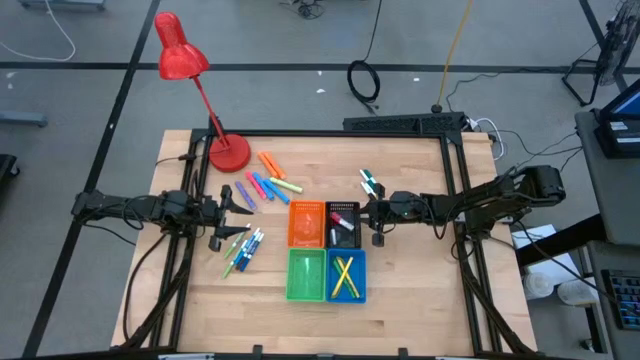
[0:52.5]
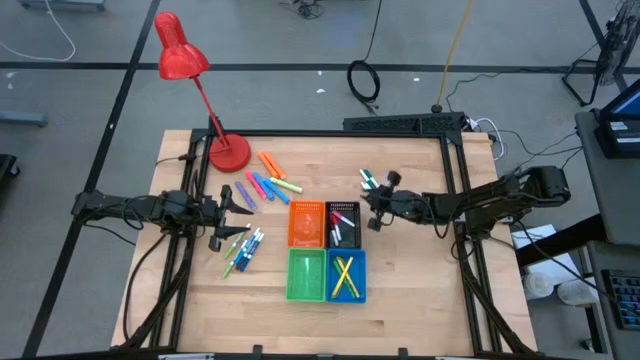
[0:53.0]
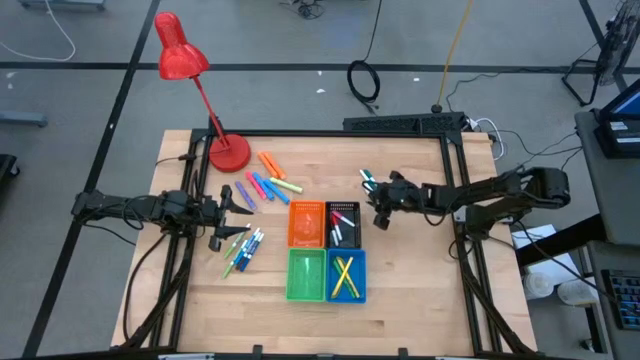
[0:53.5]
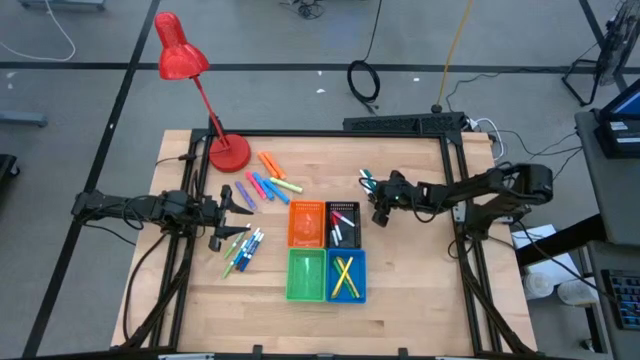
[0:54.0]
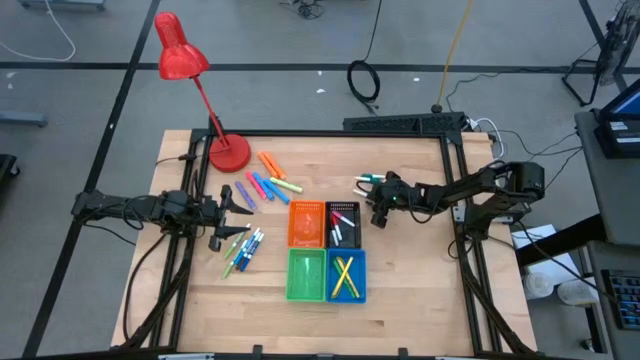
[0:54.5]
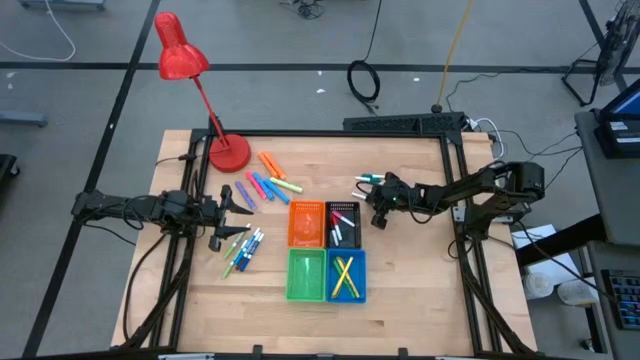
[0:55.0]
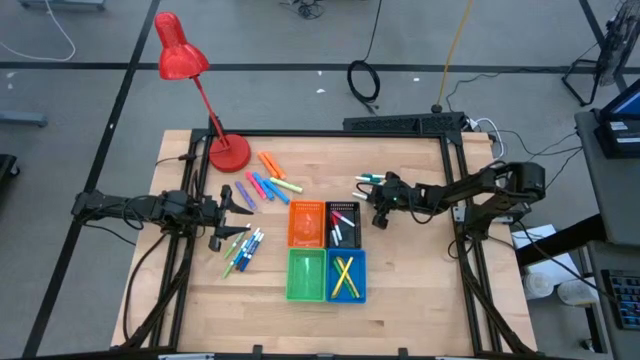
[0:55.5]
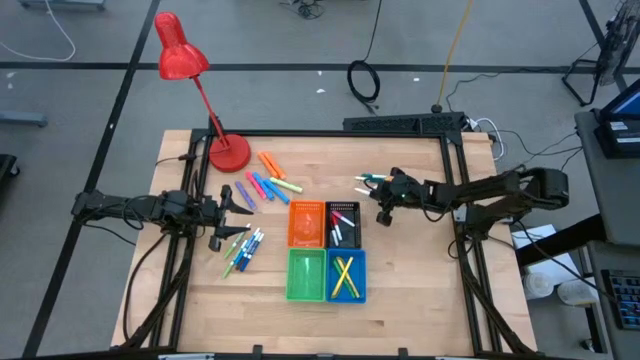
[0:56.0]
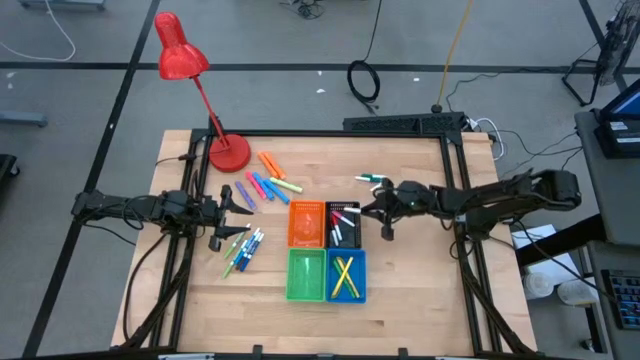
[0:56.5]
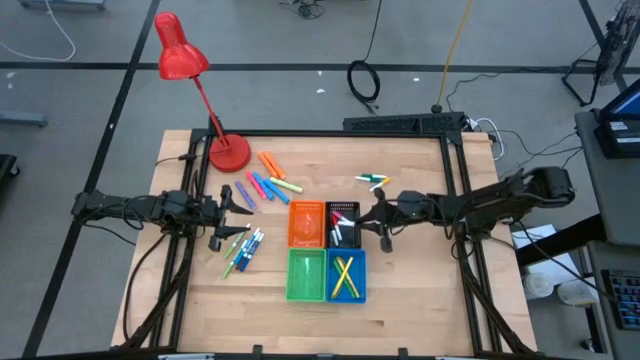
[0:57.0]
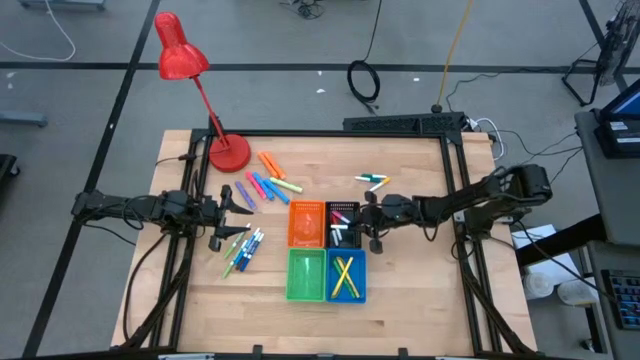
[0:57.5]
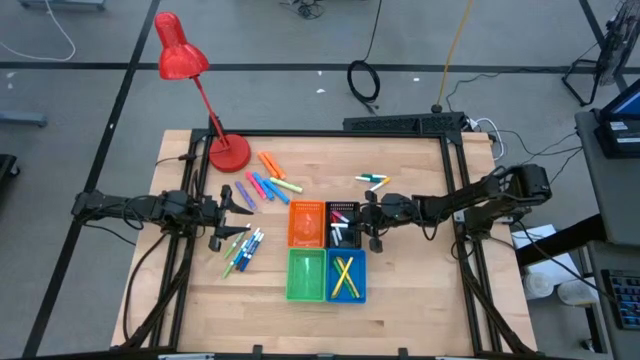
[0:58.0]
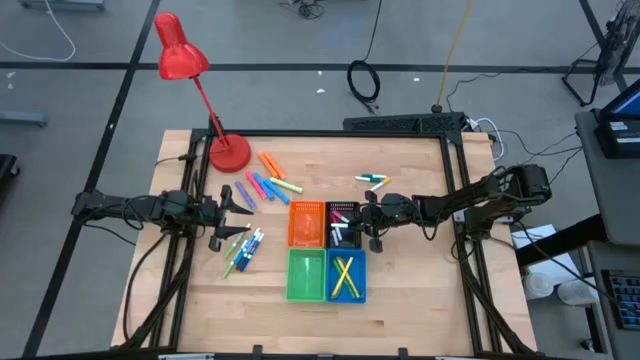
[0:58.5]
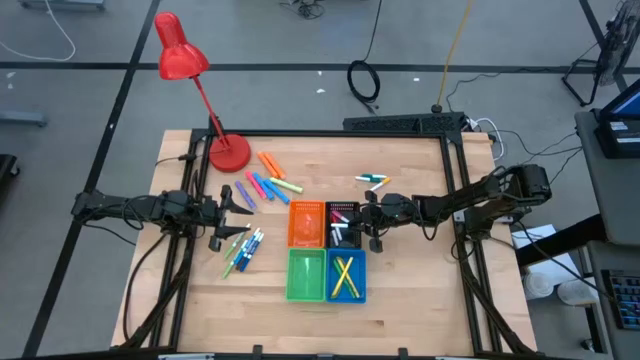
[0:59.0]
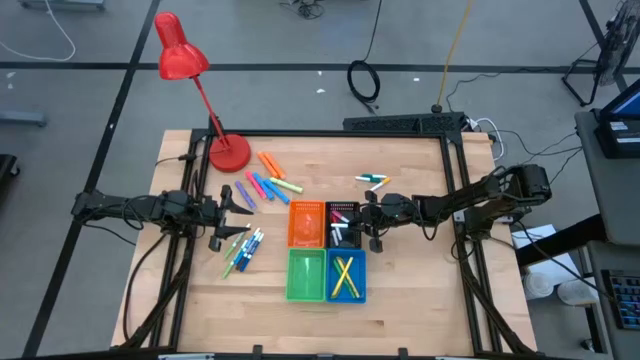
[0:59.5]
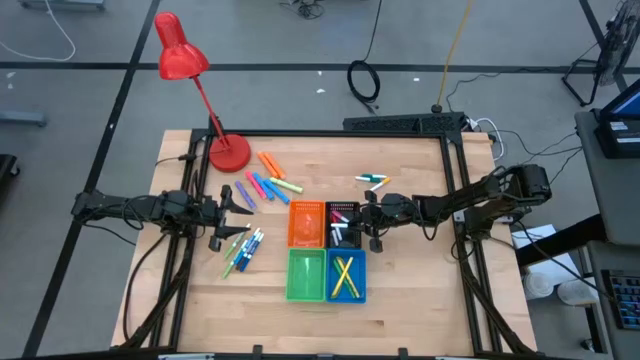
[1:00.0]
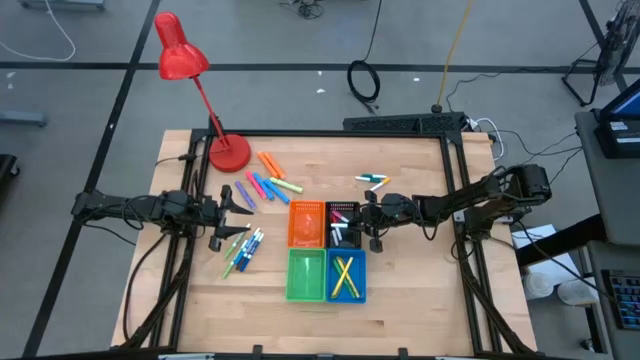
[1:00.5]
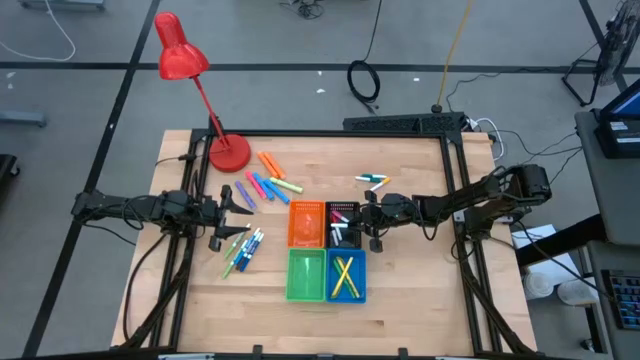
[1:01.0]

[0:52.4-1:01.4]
Task: Pick & Place Markers
Put the black highlighter pen into the black basket

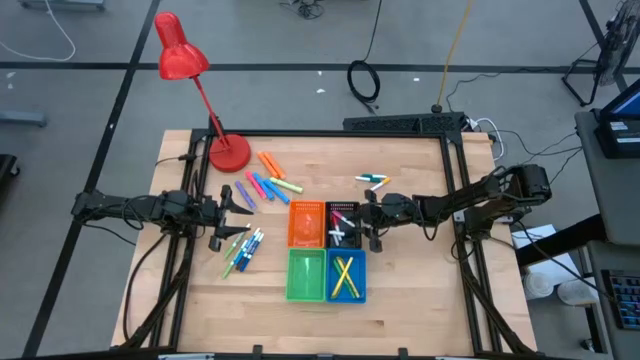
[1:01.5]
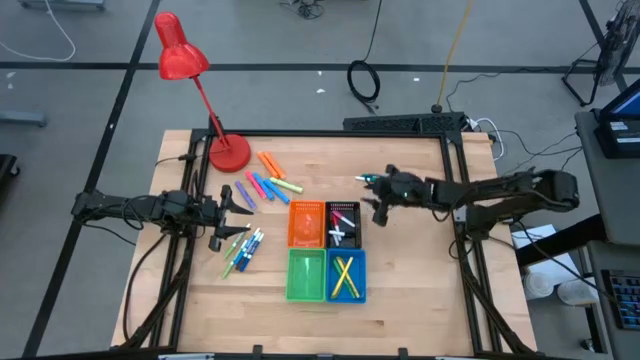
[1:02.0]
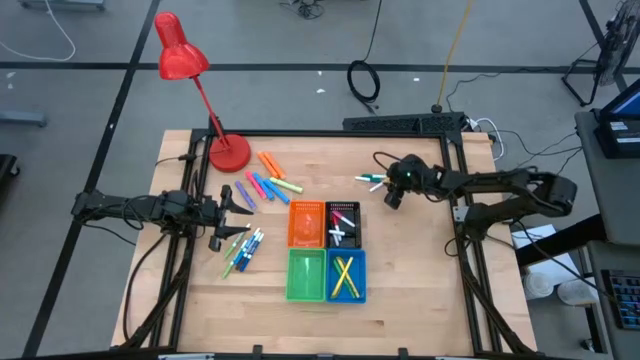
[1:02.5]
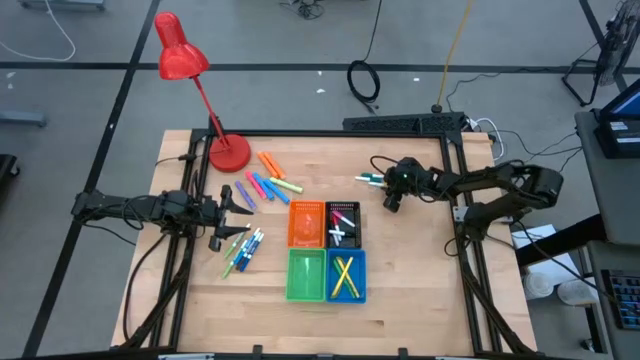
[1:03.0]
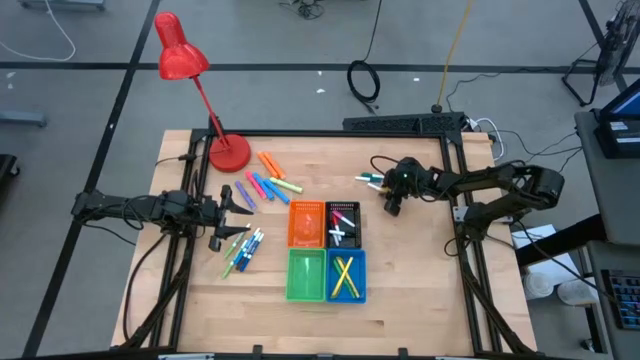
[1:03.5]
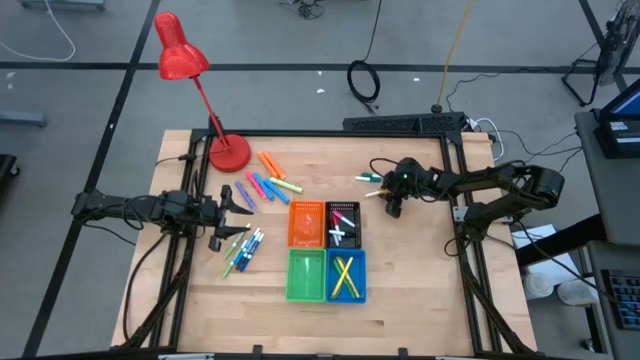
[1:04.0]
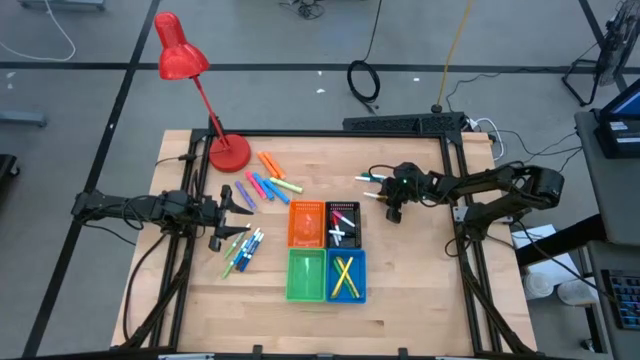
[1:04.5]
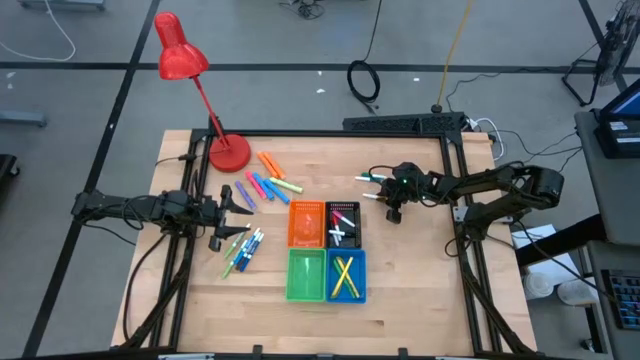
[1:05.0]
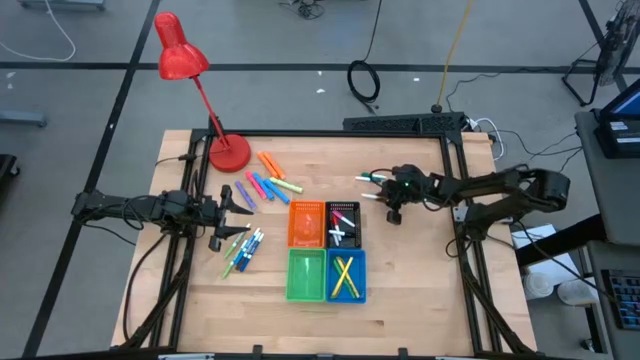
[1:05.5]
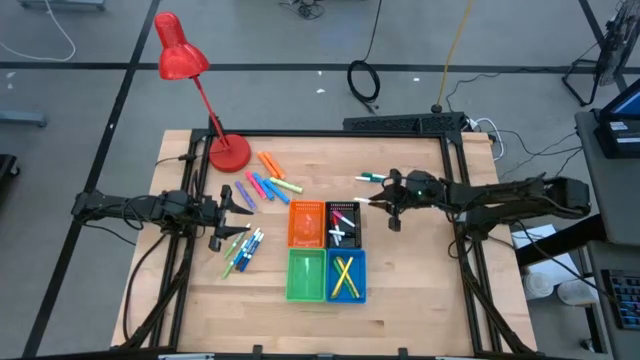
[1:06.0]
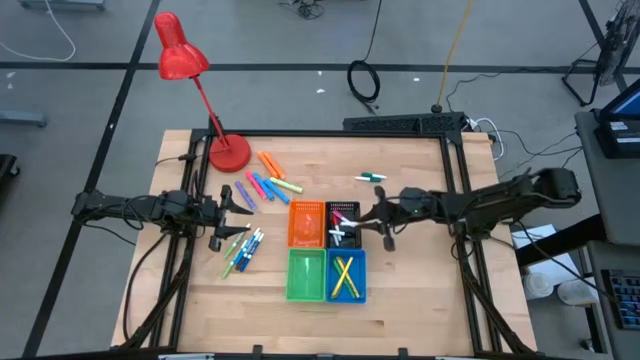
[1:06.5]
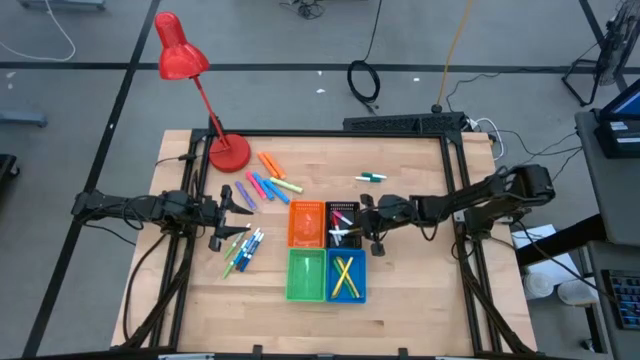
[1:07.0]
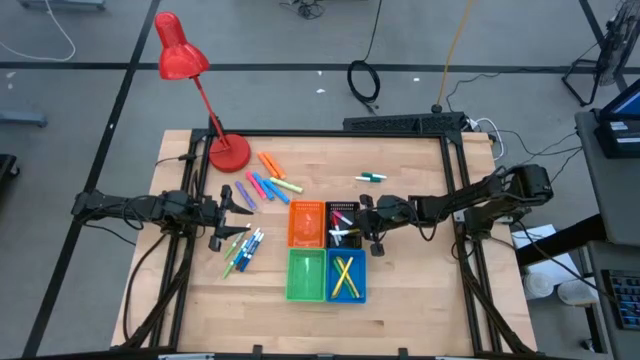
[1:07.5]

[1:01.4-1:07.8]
Put the yellow highlighter pen into the black basket

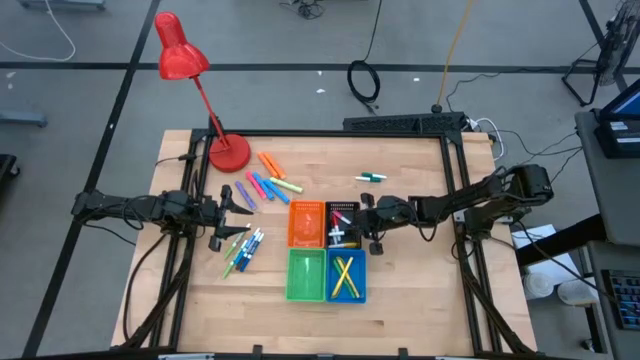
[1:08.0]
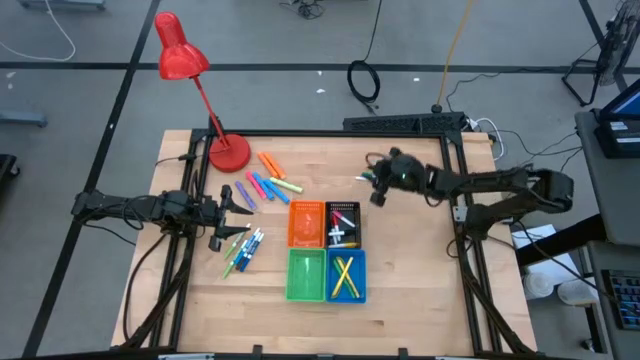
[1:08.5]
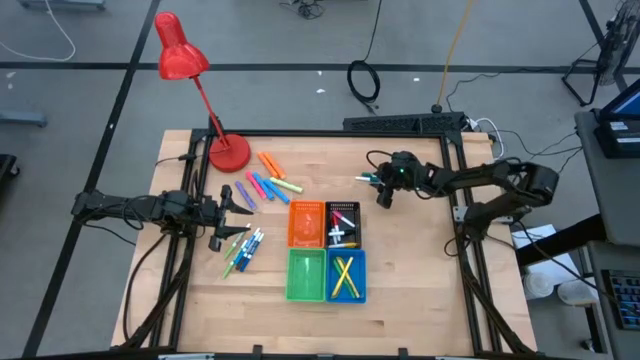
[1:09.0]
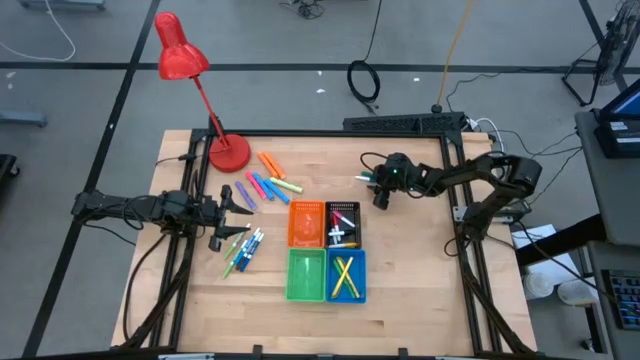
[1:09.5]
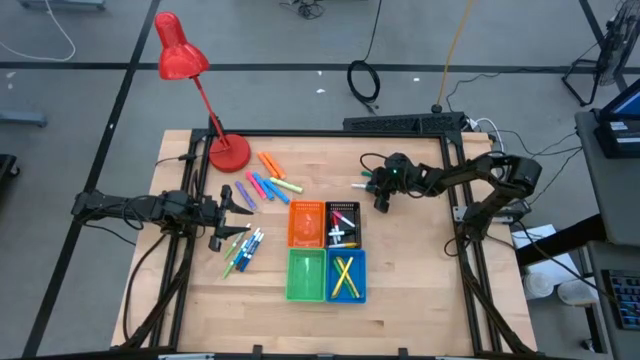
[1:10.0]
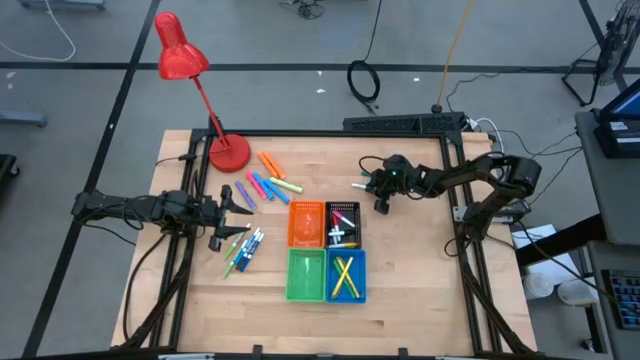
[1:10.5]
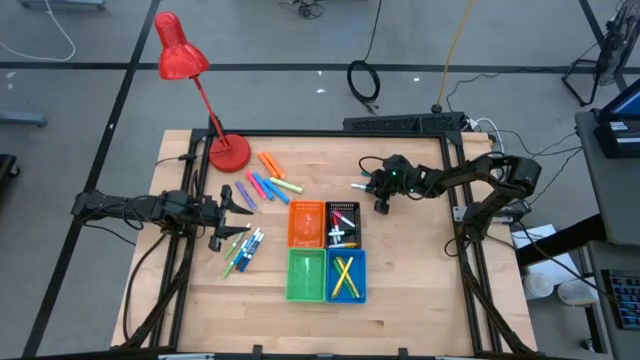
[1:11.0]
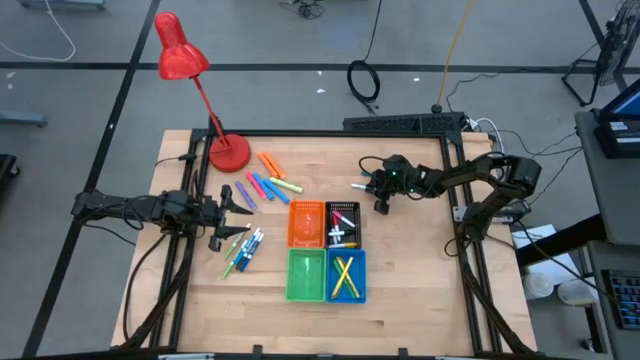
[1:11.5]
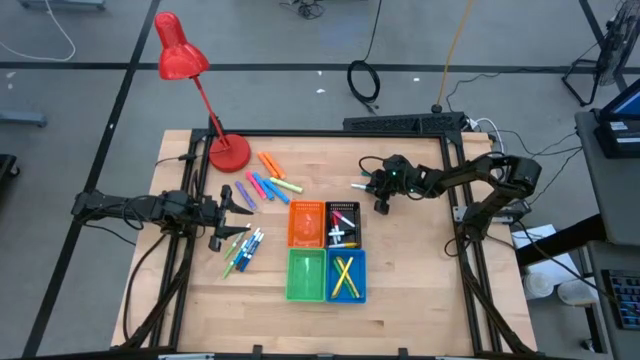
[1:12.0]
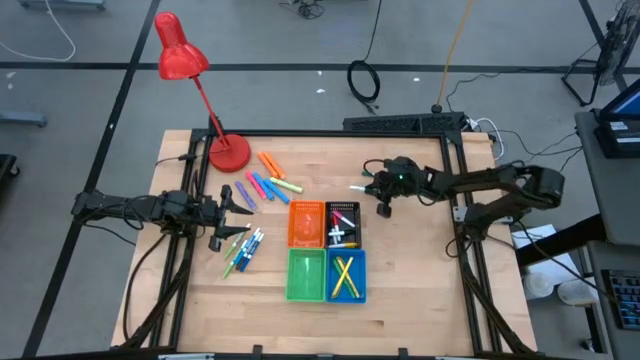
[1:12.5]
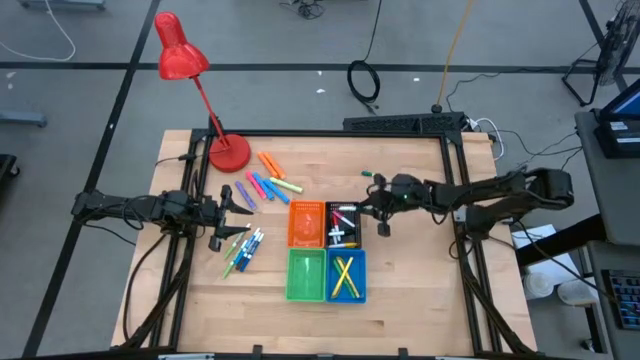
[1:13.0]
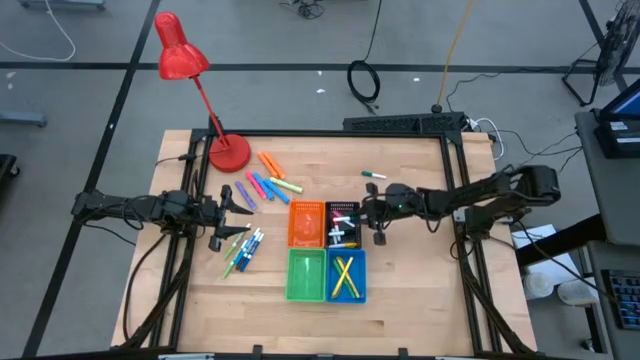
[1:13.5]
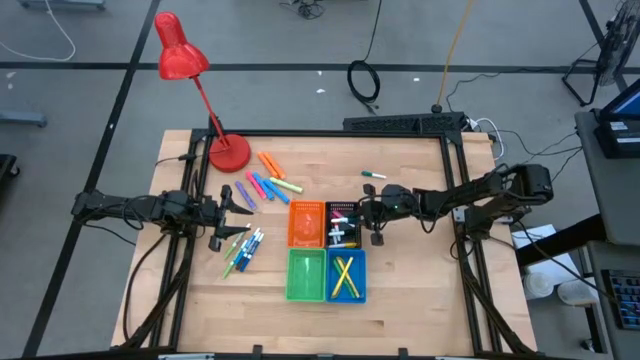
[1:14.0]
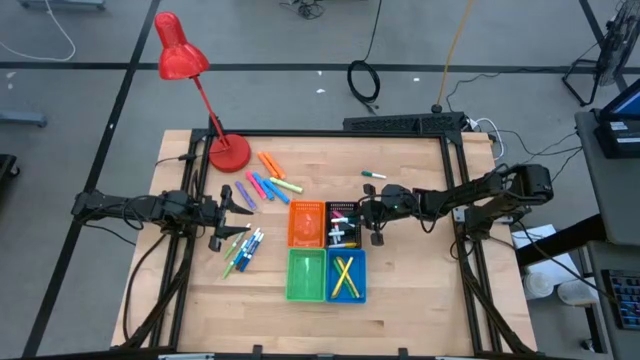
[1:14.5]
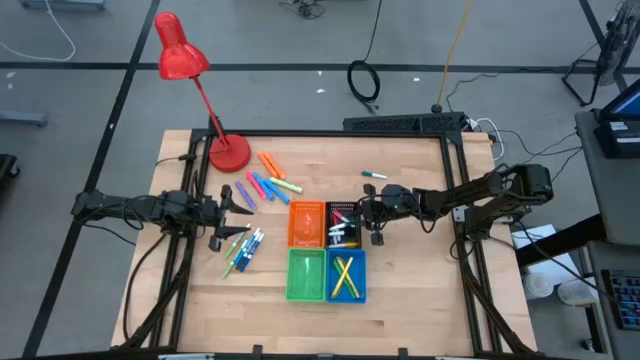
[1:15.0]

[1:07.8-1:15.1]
Put the bottom green highlighter pen into the black basket
